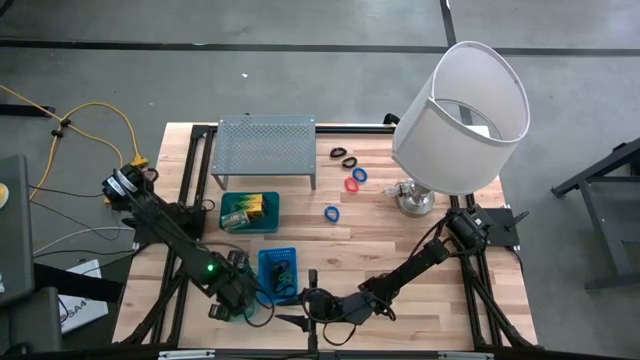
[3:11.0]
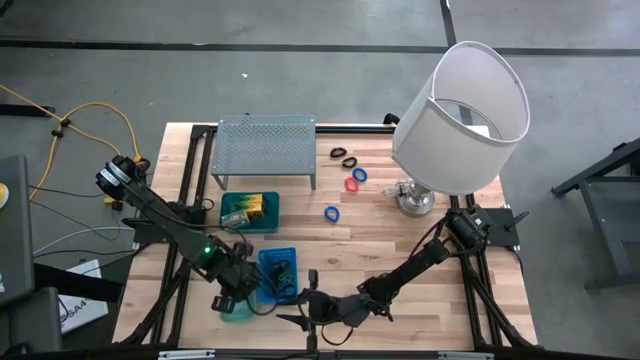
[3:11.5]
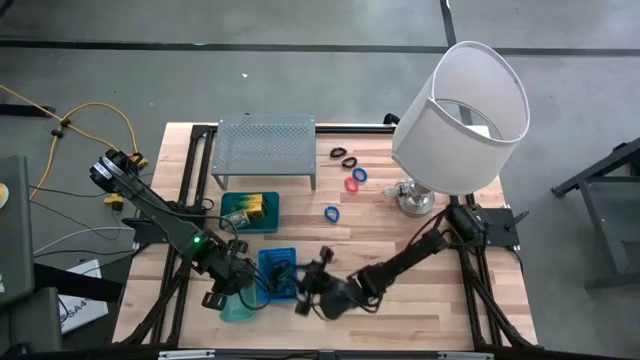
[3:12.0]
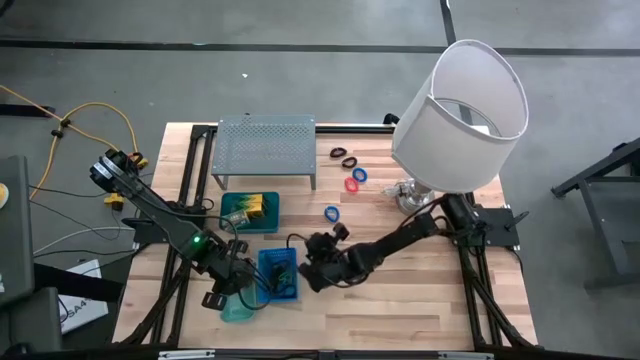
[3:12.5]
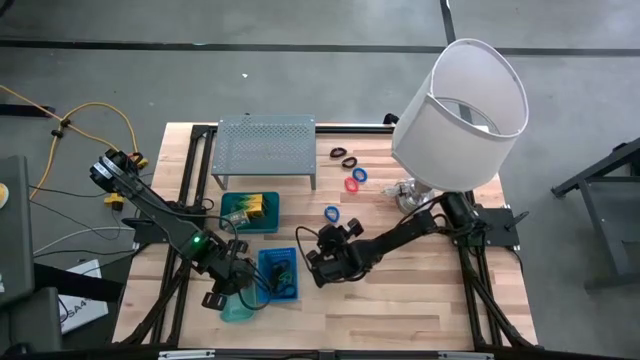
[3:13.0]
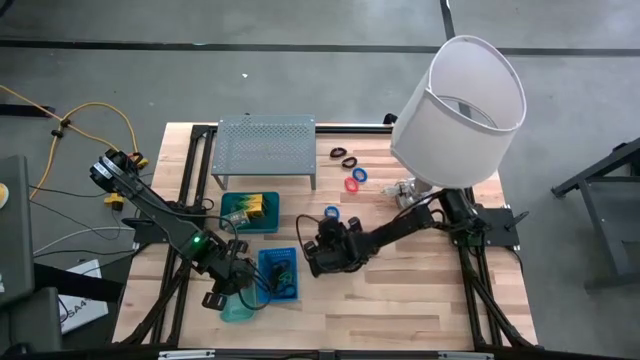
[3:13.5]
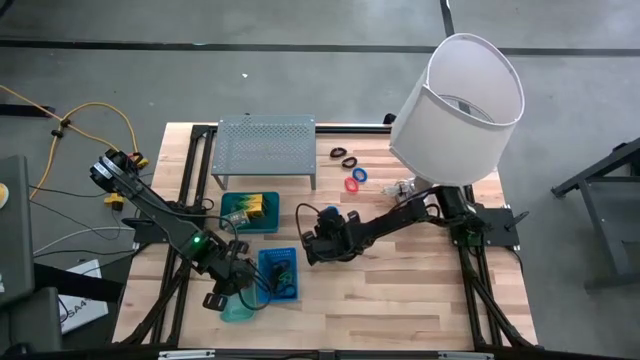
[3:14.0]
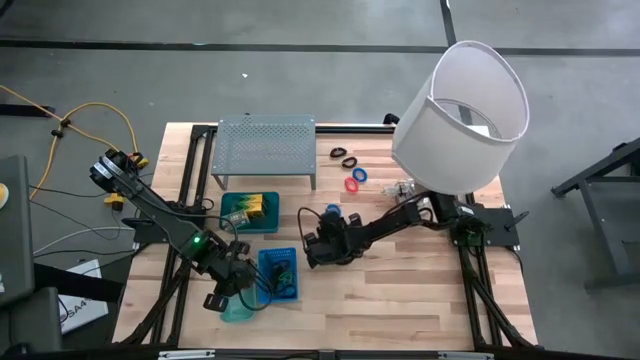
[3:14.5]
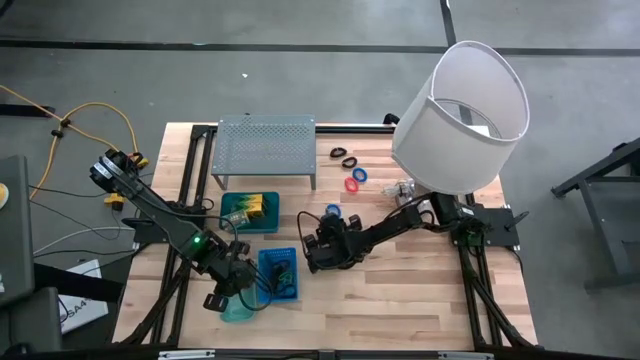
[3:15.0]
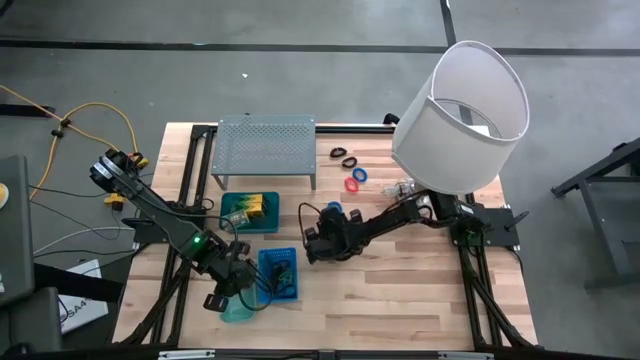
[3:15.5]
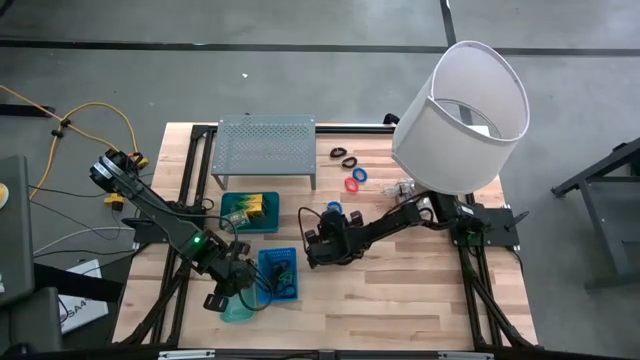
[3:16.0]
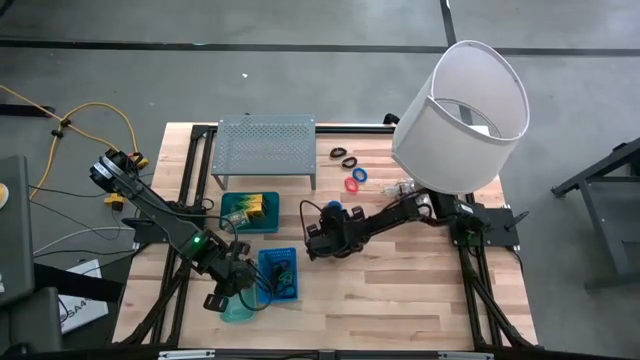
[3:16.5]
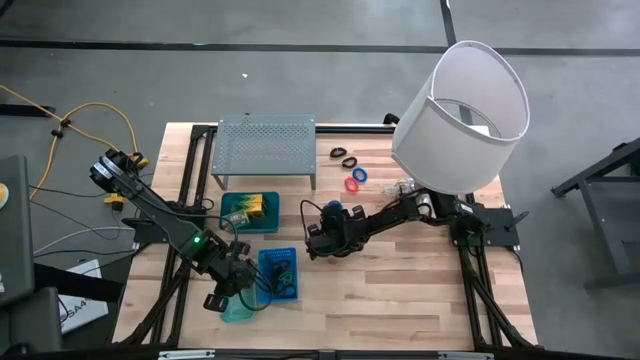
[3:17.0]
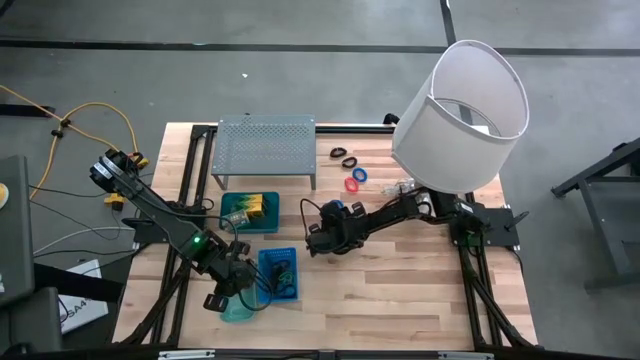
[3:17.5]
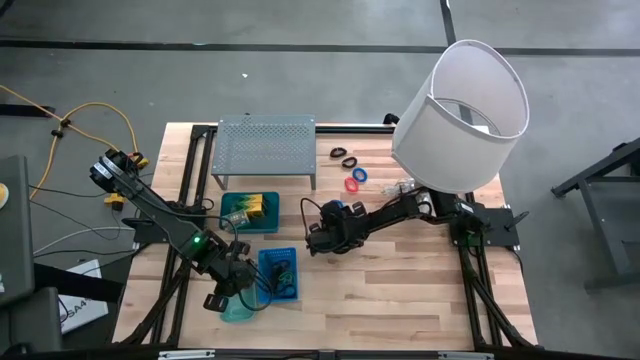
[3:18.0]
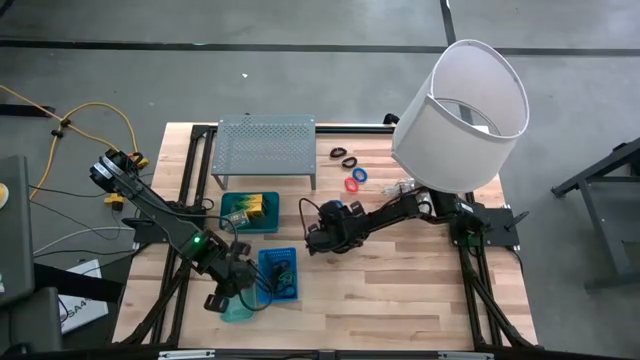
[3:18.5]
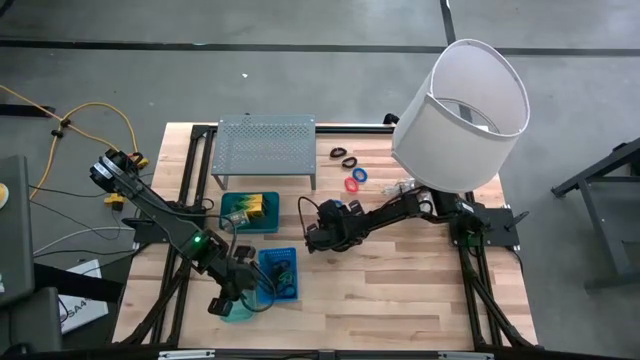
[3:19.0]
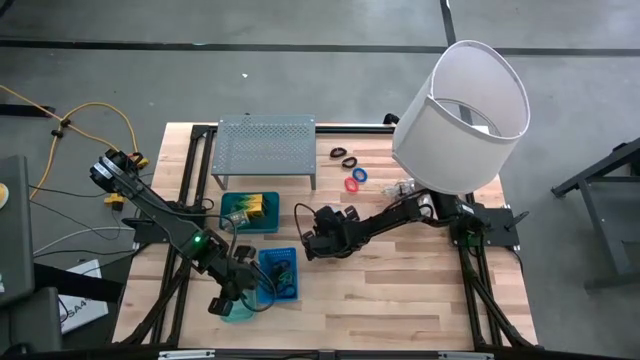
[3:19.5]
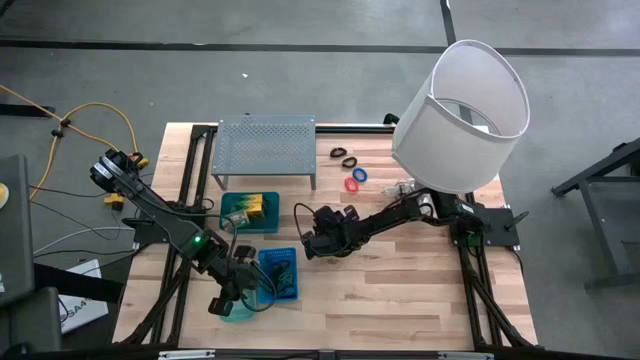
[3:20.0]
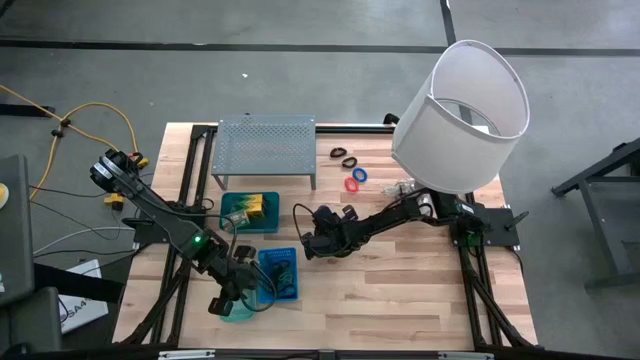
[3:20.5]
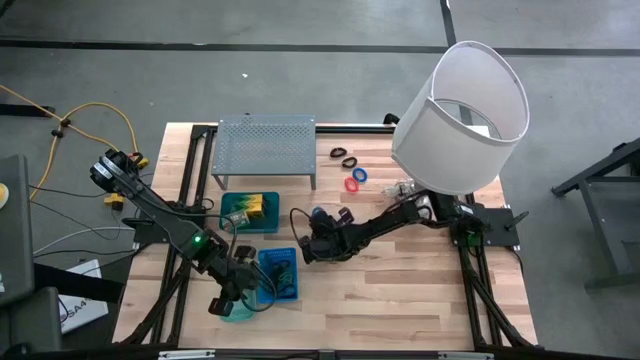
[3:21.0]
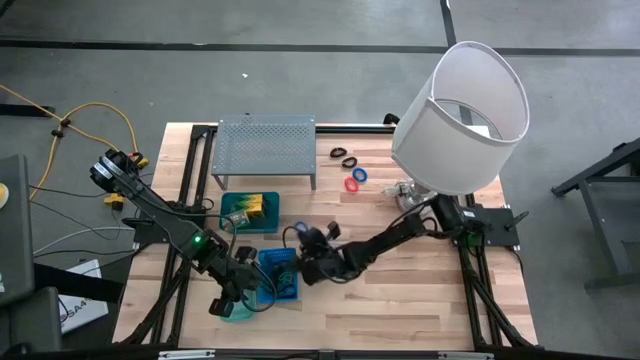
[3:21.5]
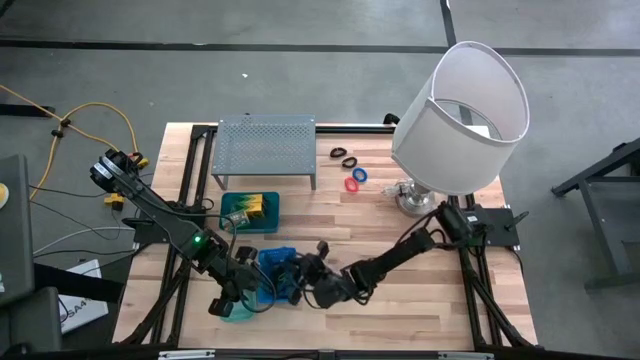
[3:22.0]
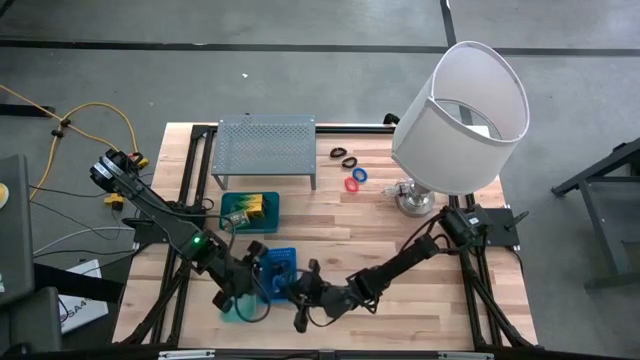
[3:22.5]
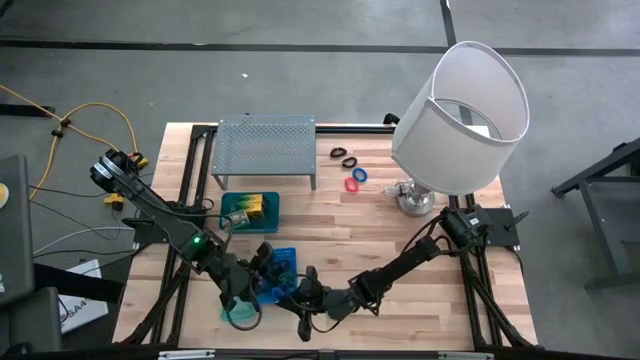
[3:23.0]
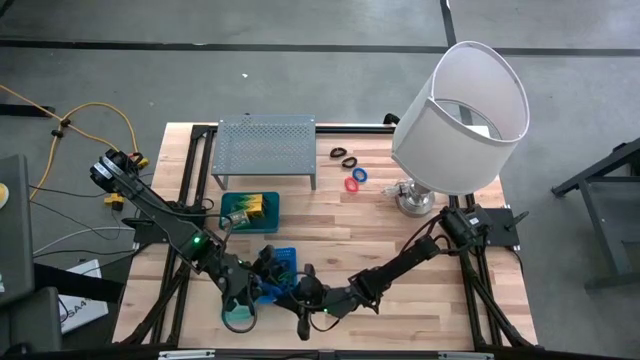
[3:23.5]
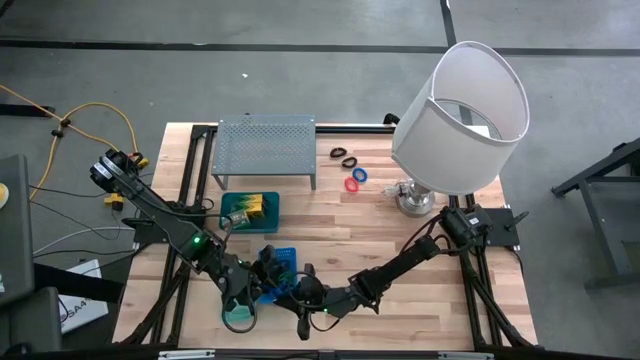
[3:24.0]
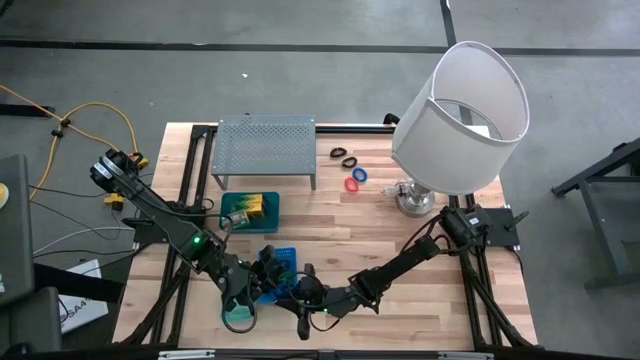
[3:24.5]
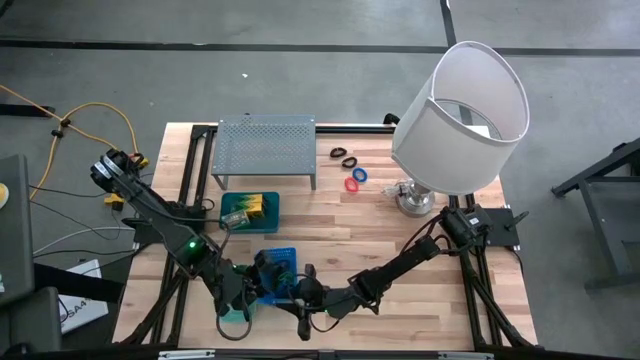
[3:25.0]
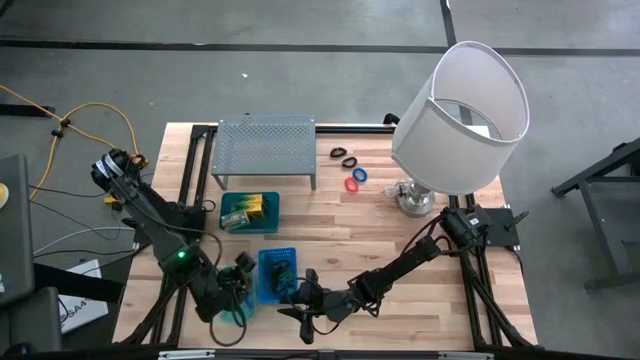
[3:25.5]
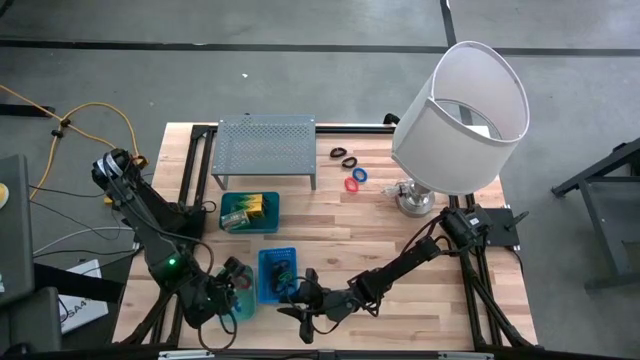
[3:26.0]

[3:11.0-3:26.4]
Task: Pick & Place Office Desk Supplies
Put the bottom blue spring keychain into the green bin

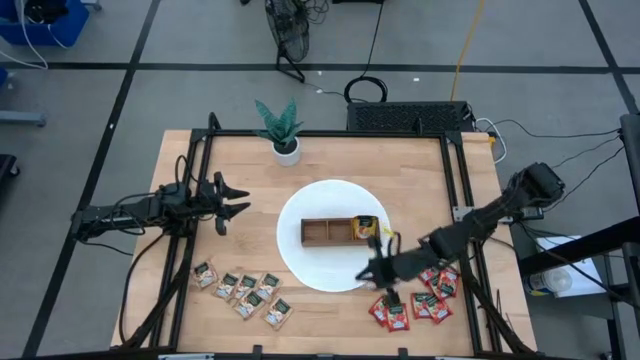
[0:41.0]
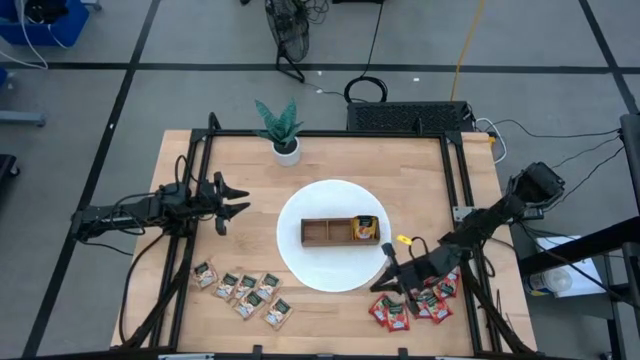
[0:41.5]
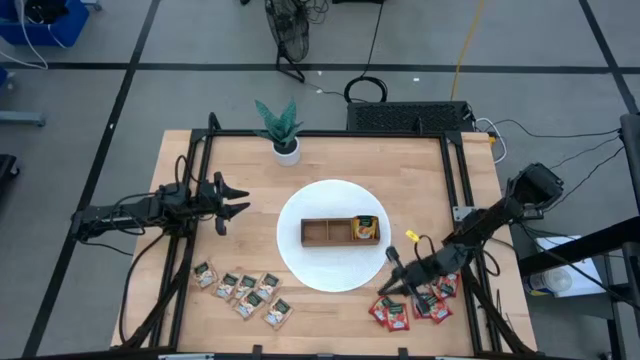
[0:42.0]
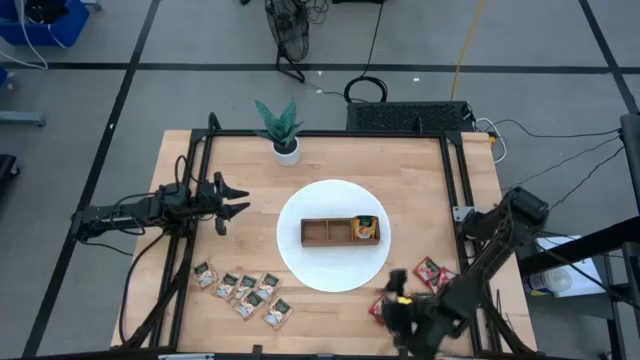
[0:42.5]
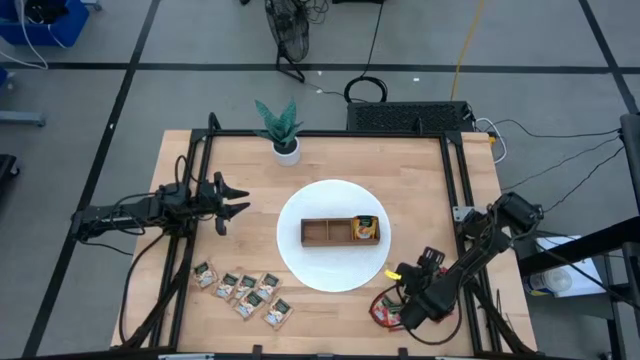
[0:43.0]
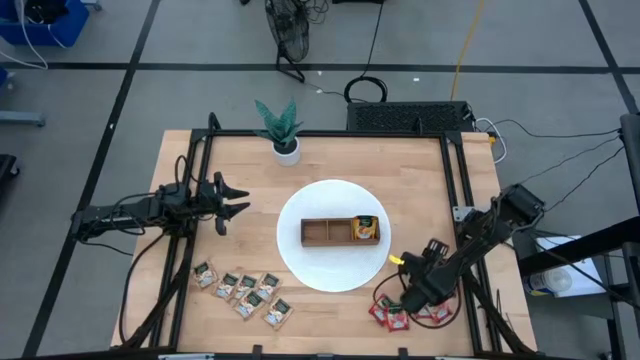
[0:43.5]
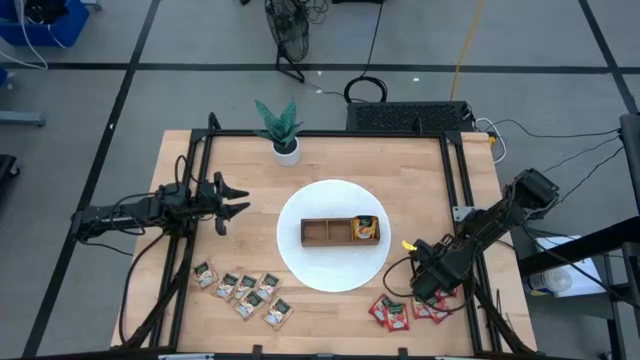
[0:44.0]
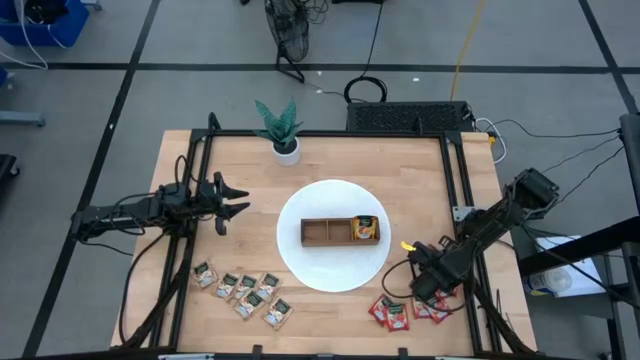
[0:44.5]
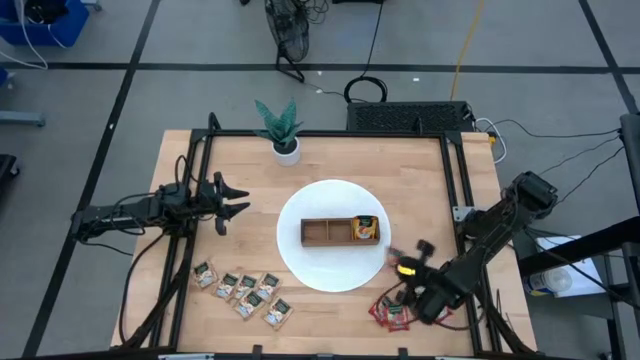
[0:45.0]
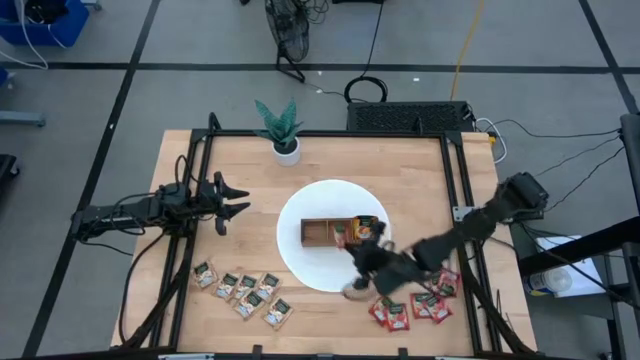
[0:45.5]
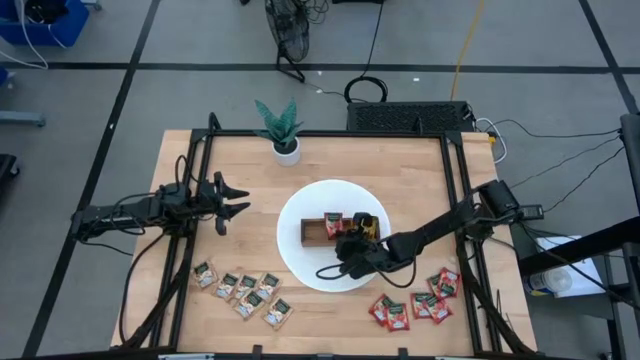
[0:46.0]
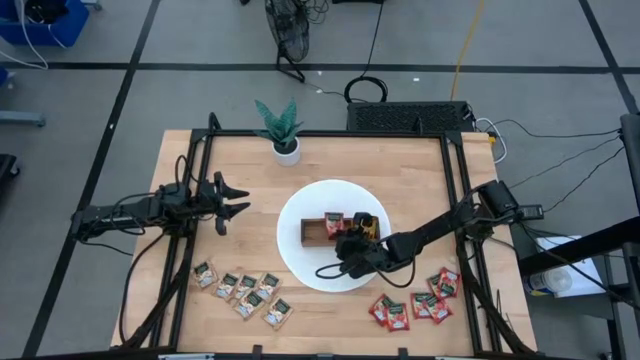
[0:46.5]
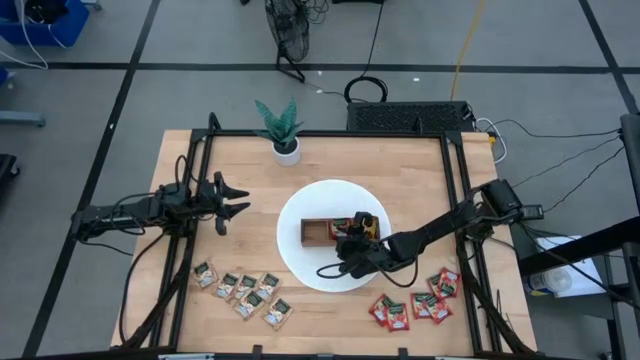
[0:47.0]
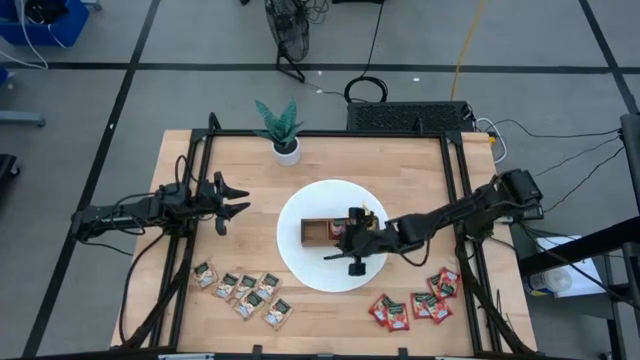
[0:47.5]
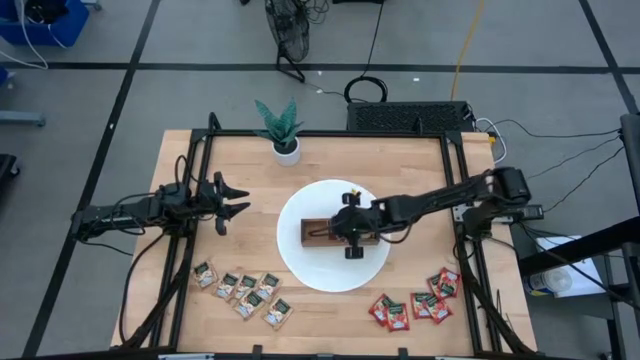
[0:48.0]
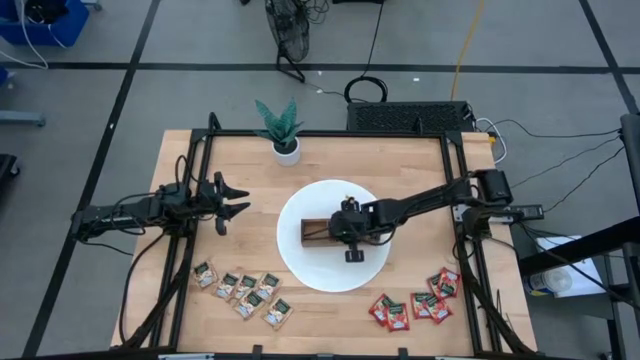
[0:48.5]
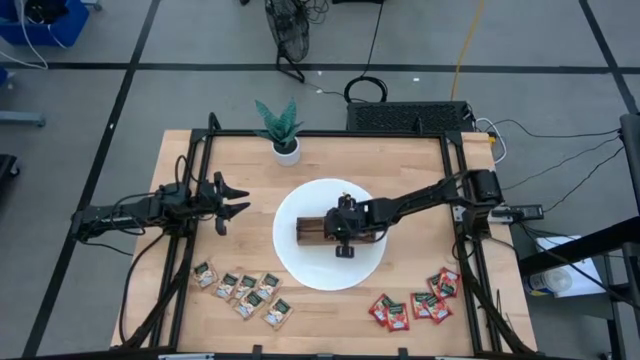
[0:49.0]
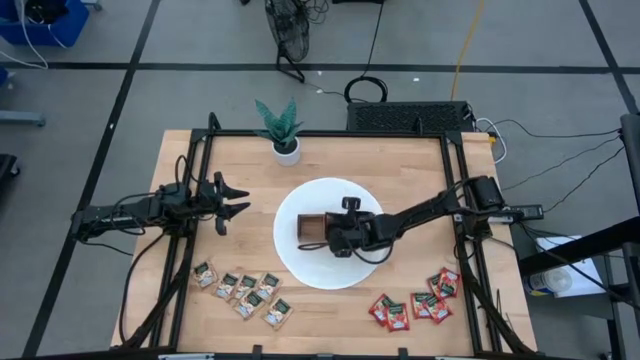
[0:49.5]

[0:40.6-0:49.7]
Task: Pick & Place Tea
Put the red tea bag into the middle section of the wooden organizer
